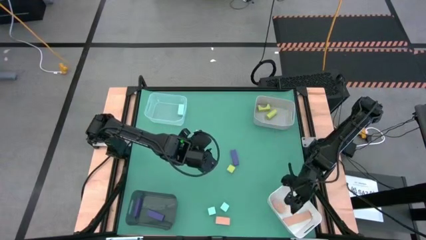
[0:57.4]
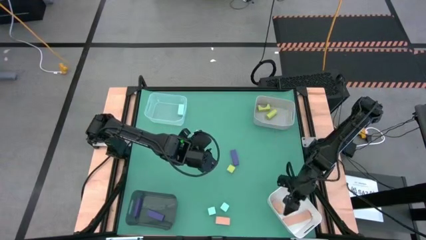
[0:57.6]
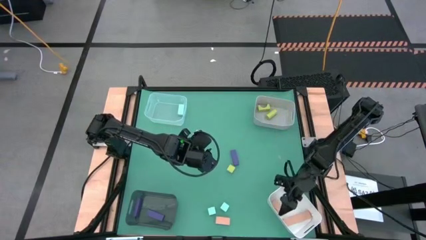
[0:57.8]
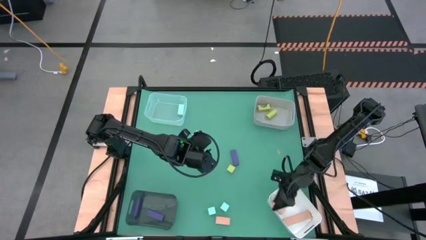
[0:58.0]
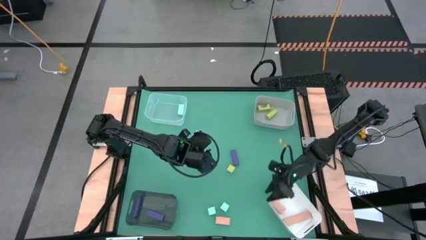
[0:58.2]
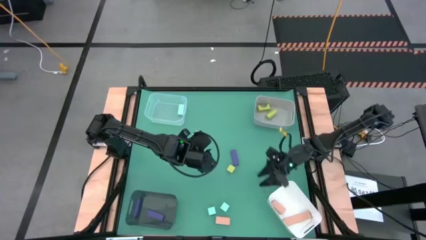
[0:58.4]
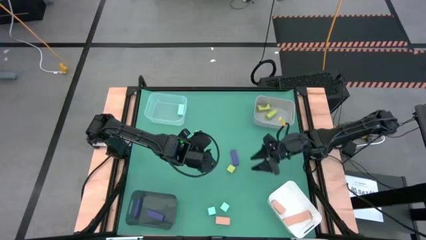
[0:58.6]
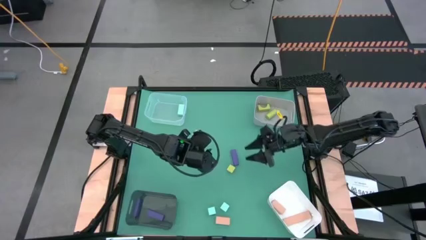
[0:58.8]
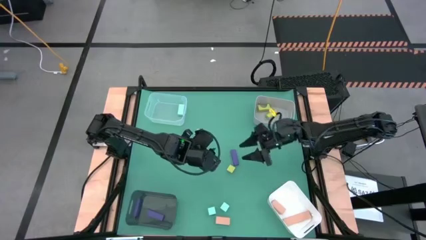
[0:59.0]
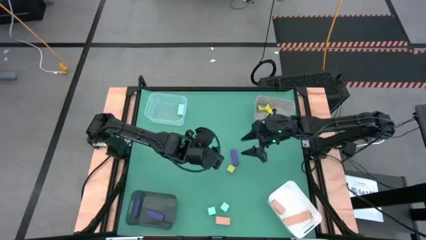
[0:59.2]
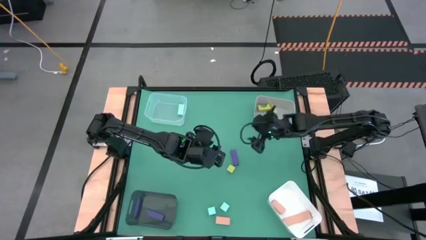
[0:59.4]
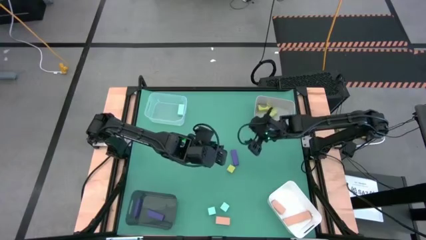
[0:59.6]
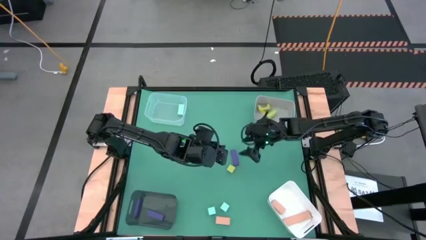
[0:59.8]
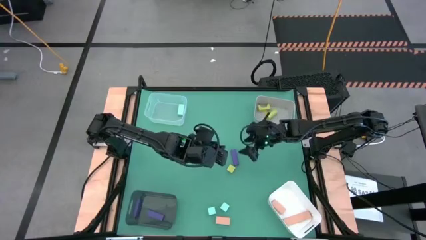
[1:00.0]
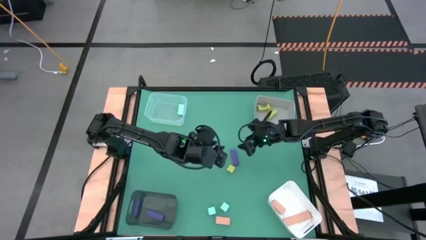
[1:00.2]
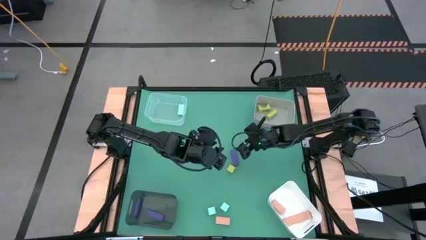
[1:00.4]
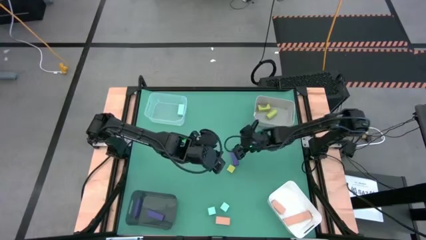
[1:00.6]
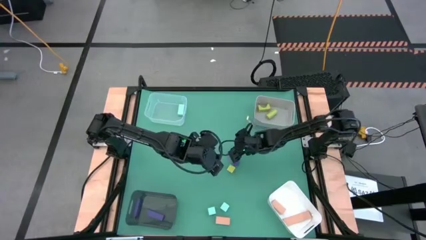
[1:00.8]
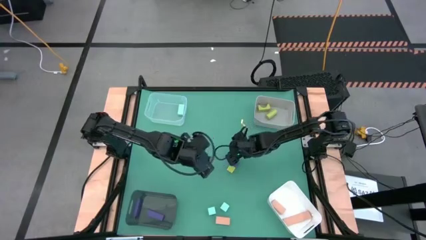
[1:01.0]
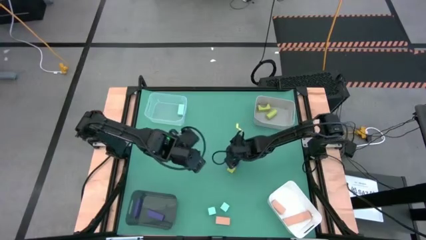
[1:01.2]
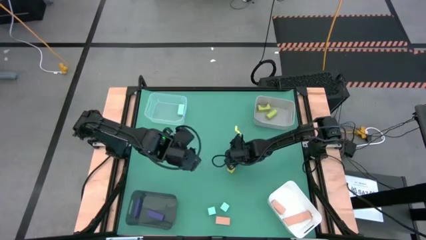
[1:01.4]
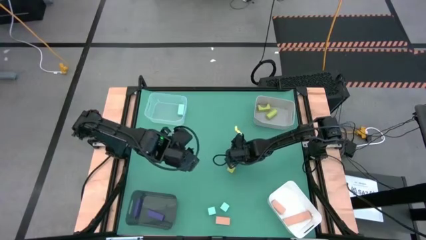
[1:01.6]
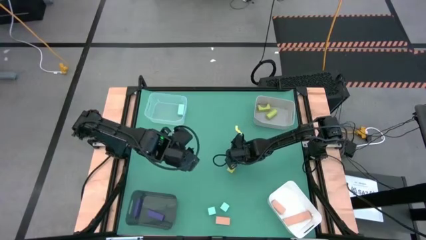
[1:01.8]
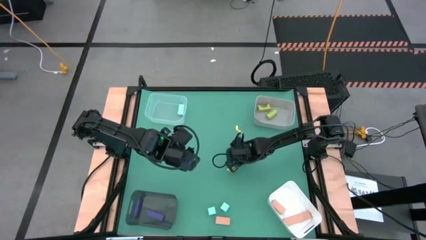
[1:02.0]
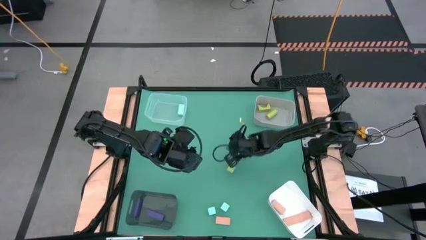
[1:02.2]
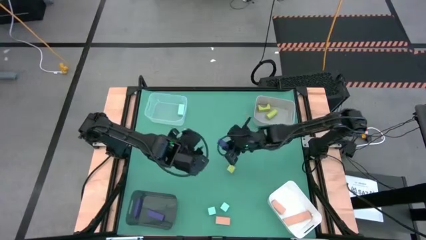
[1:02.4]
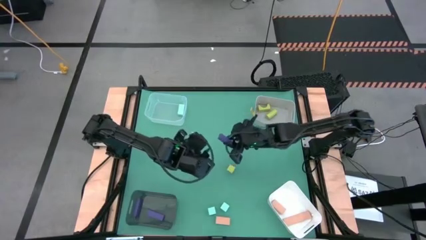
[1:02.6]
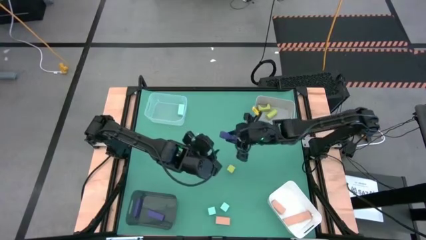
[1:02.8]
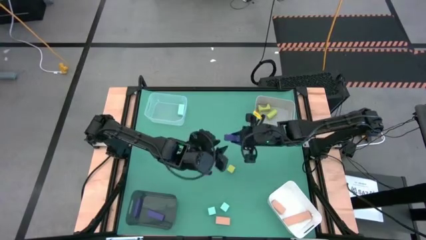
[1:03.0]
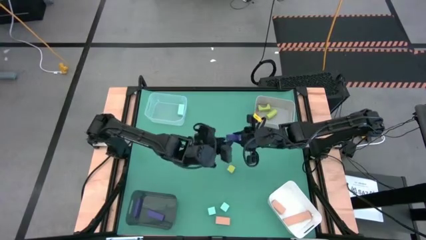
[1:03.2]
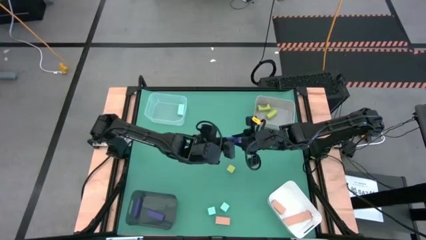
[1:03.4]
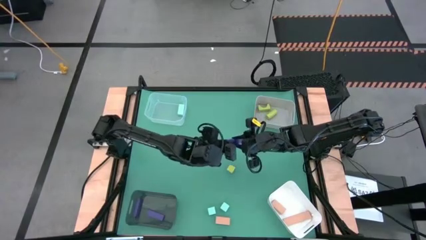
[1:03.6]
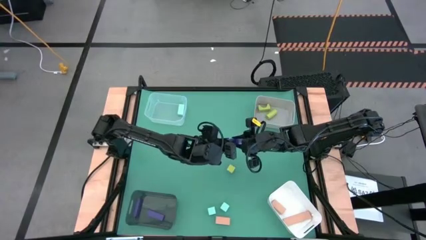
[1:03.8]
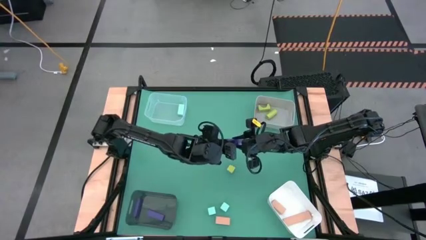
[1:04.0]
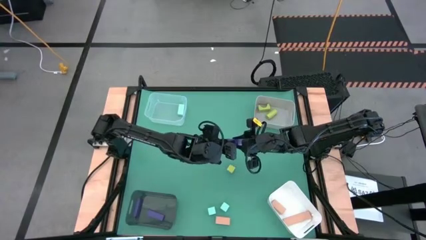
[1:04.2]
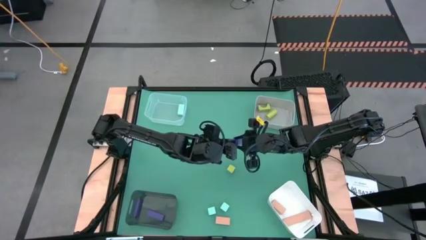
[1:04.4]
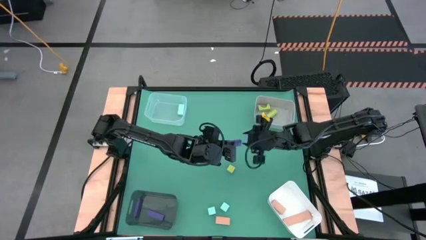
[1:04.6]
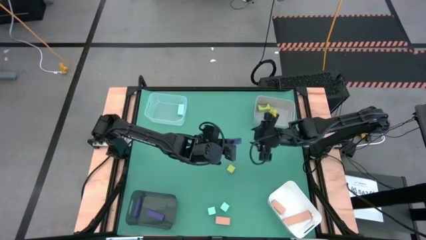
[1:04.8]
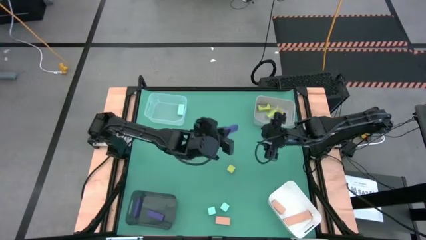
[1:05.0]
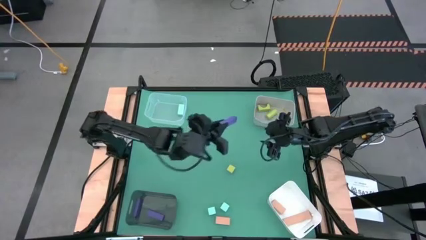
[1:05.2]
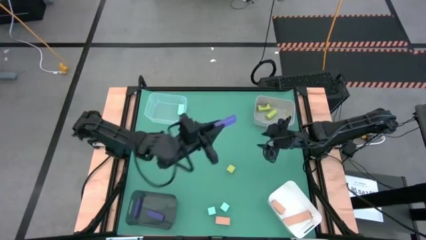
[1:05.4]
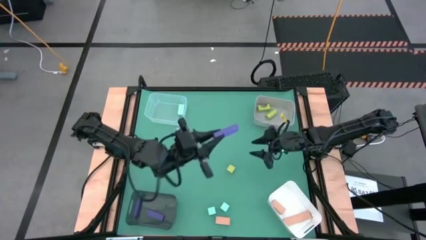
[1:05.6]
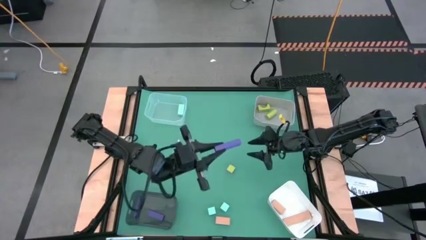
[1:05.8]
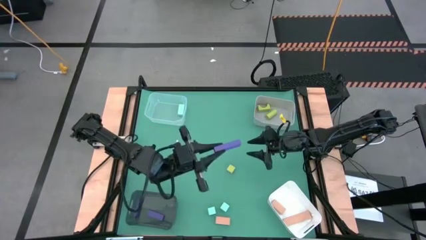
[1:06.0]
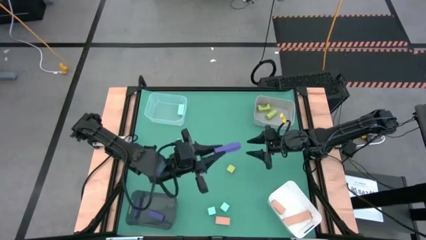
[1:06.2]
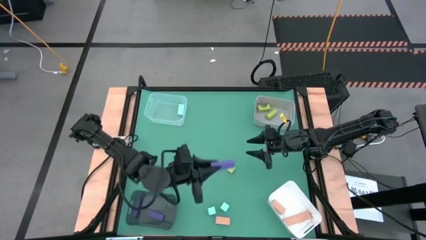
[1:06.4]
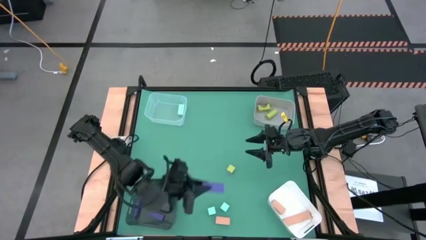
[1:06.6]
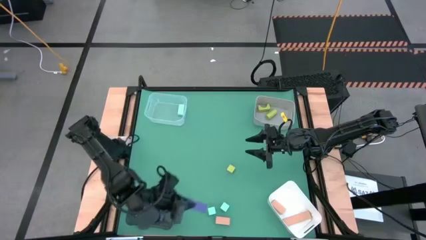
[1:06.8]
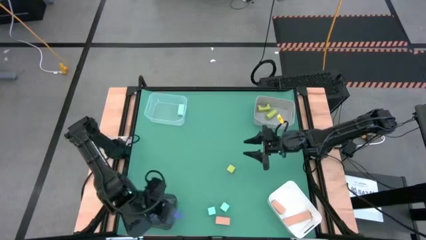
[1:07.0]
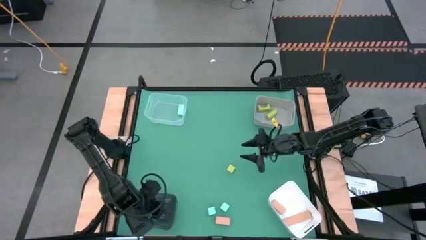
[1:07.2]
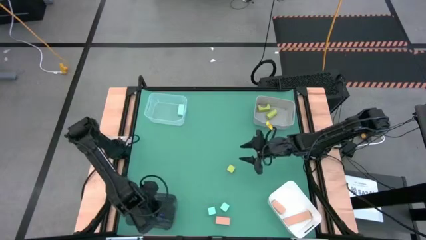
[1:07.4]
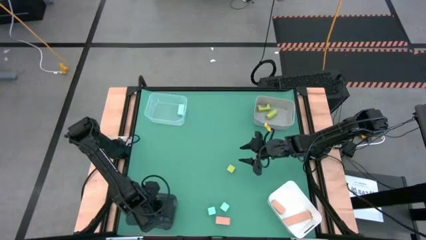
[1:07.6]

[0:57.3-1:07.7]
Task: Sort & place blocks by color
Put the violet block into the black bin

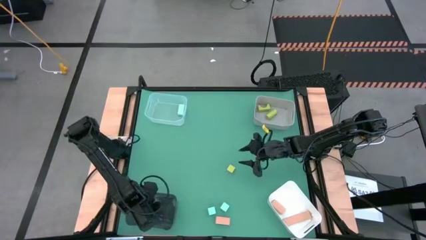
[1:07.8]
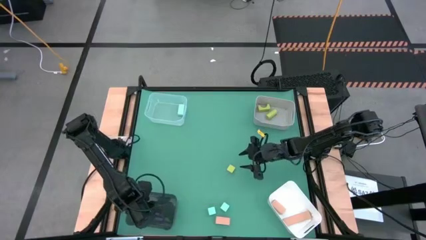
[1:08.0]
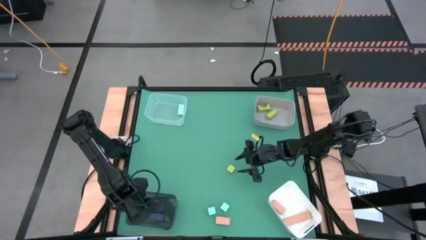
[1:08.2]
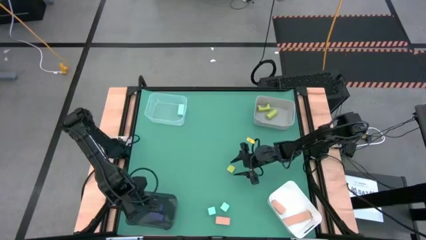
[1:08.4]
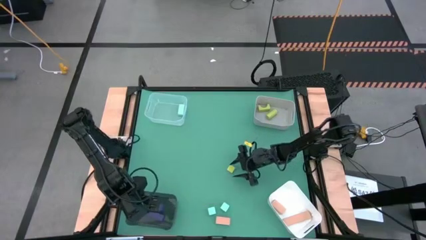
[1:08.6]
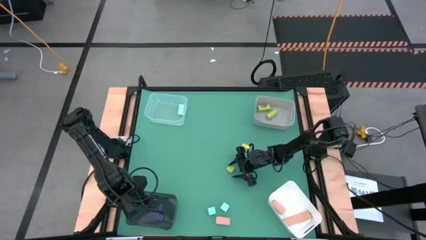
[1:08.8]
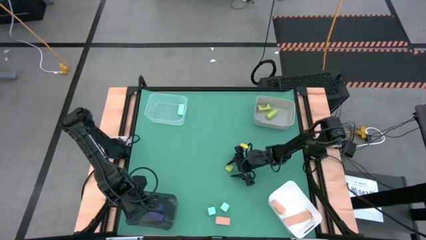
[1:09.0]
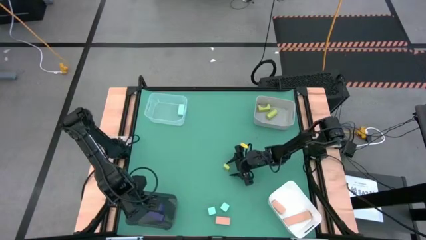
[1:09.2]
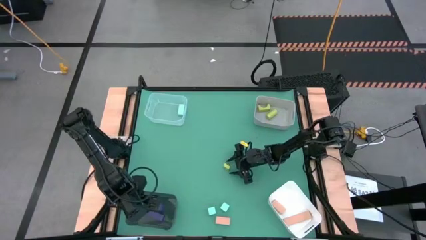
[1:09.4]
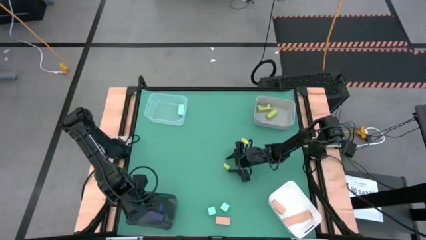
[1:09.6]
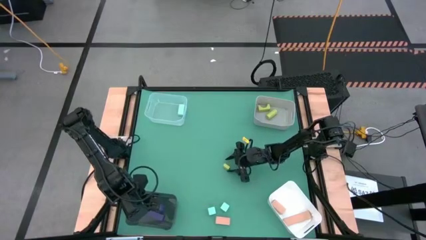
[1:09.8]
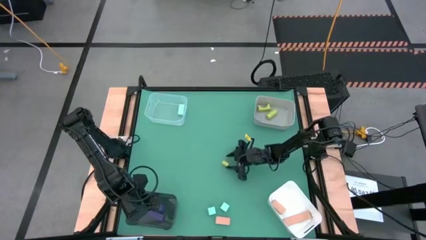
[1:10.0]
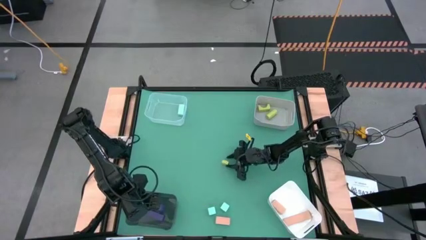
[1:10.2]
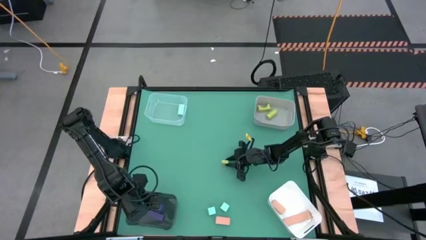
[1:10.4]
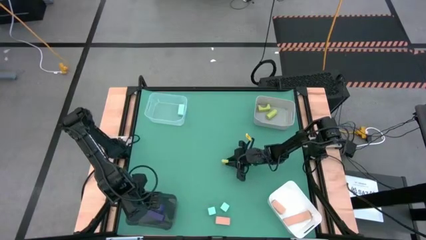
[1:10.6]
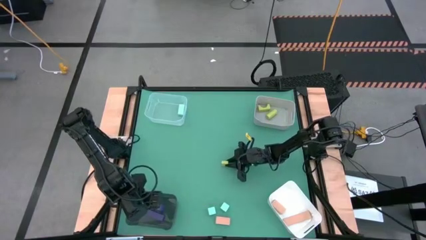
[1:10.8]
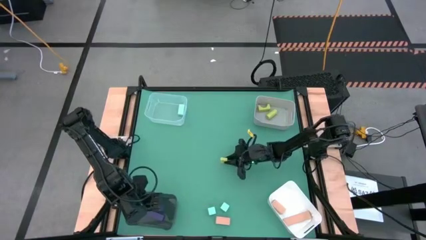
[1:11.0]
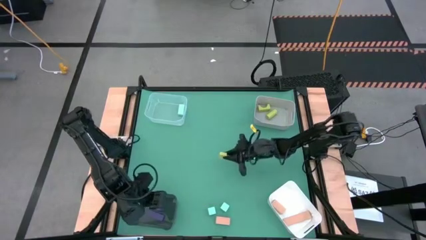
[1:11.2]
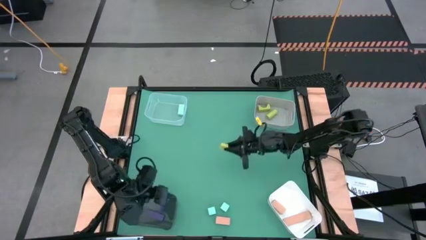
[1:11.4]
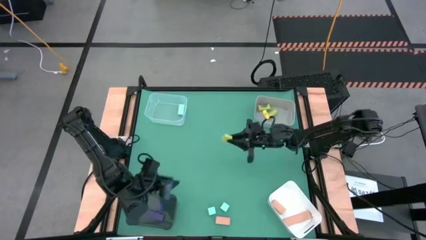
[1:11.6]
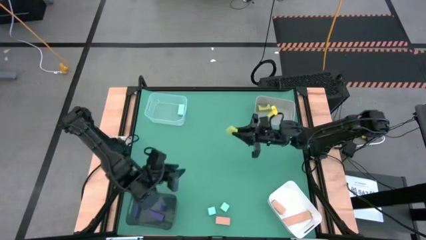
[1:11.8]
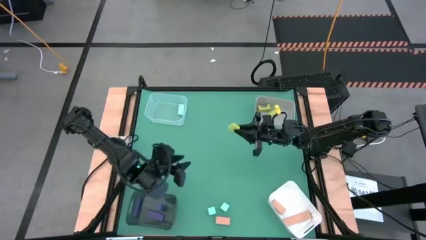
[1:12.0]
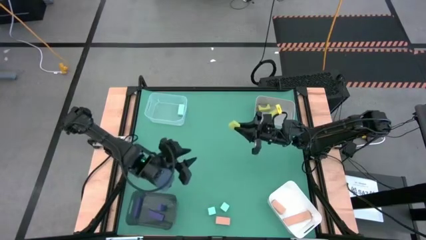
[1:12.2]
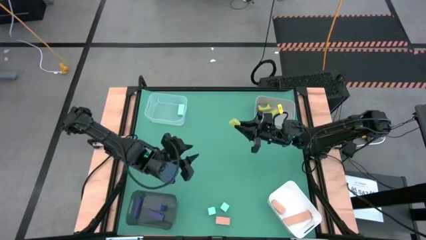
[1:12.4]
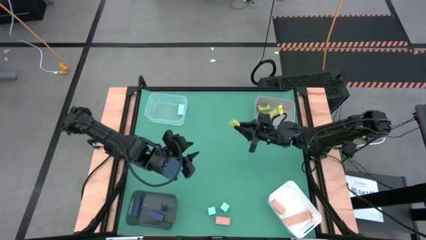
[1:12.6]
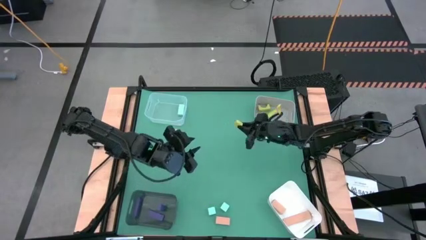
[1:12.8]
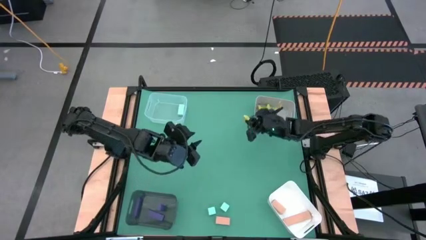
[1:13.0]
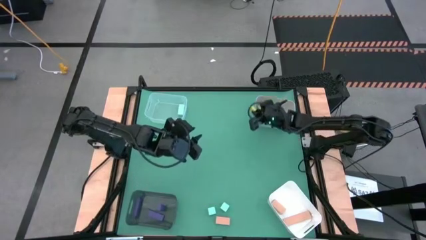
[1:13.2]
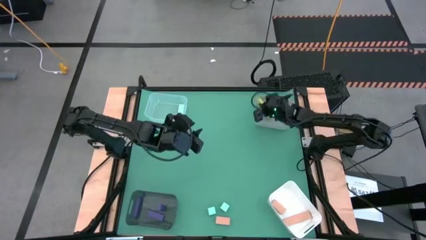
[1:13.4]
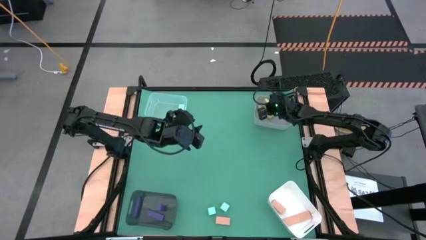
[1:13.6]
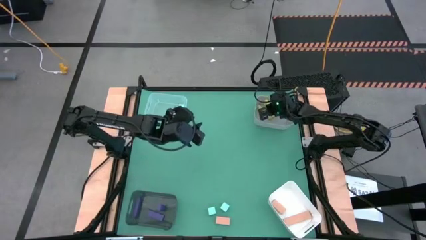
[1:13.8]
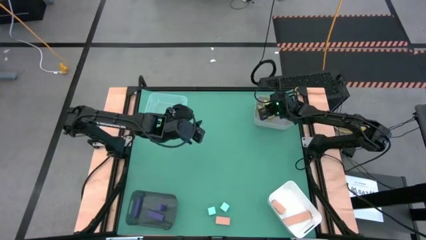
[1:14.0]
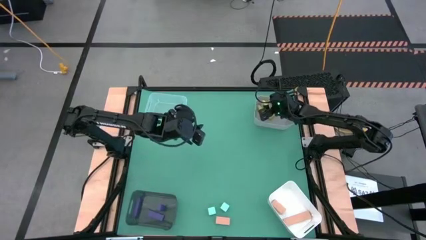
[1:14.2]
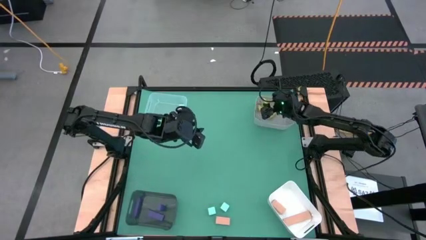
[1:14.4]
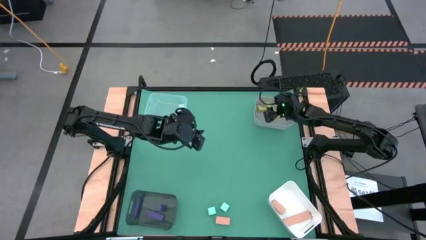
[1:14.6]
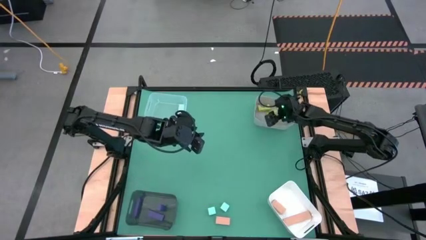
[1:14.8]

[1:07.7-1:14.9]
Put the light green block into the gray bin
